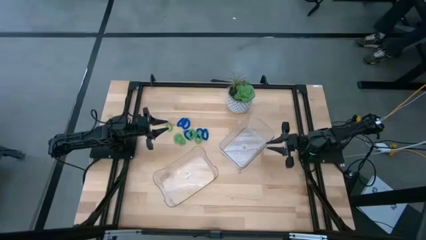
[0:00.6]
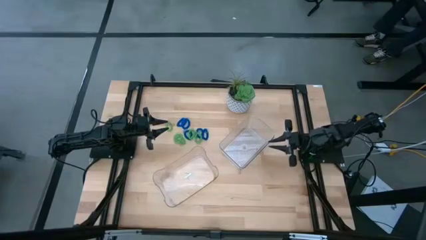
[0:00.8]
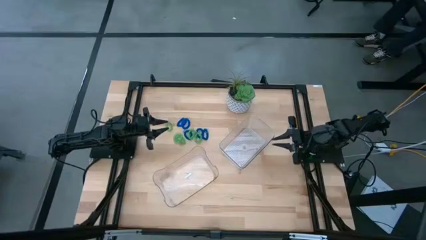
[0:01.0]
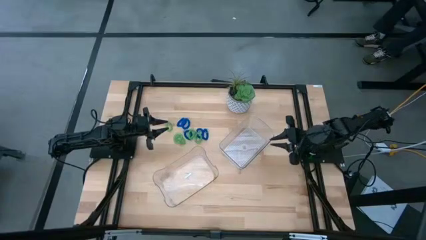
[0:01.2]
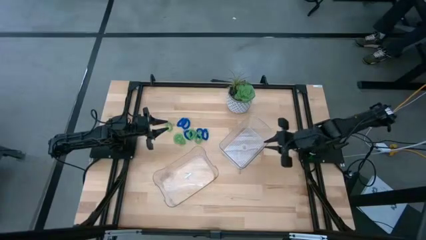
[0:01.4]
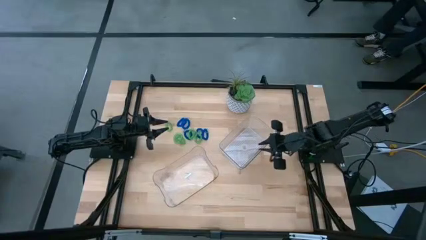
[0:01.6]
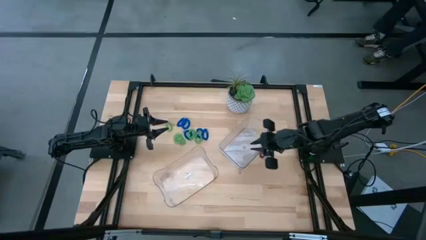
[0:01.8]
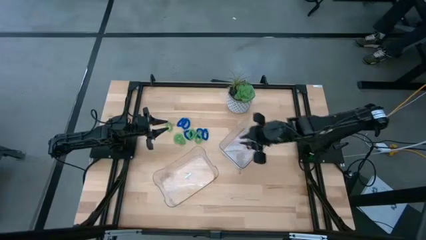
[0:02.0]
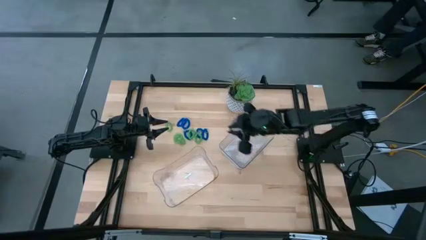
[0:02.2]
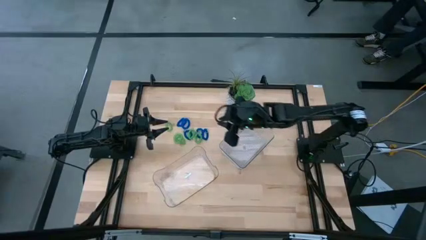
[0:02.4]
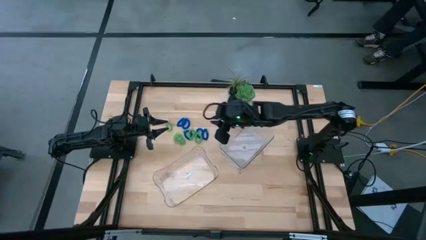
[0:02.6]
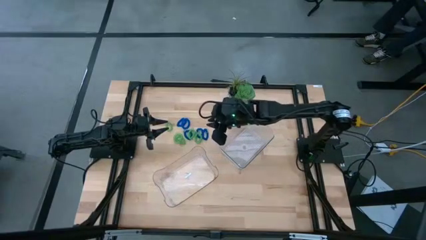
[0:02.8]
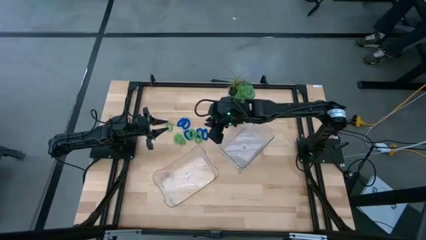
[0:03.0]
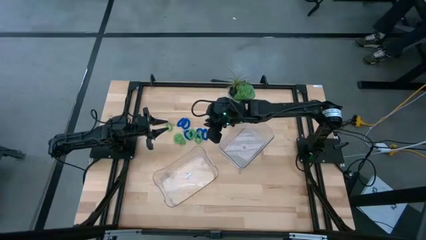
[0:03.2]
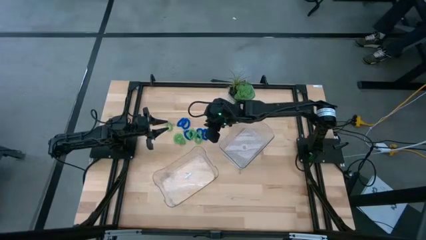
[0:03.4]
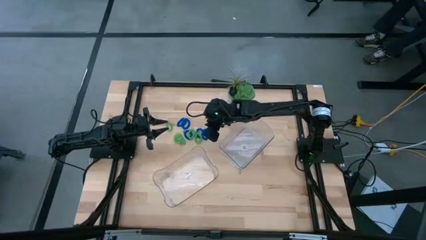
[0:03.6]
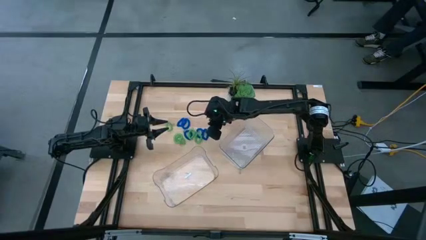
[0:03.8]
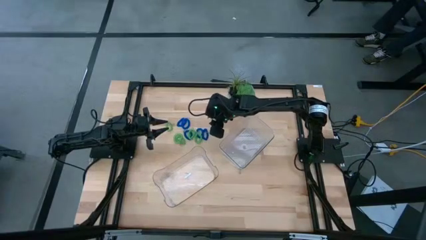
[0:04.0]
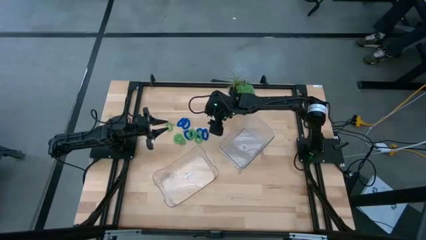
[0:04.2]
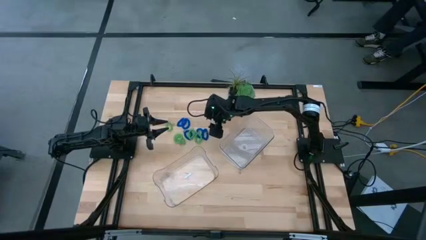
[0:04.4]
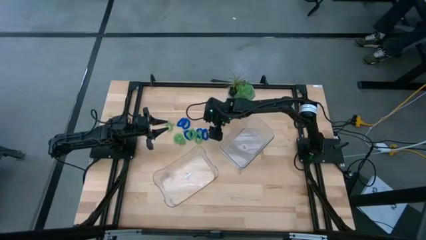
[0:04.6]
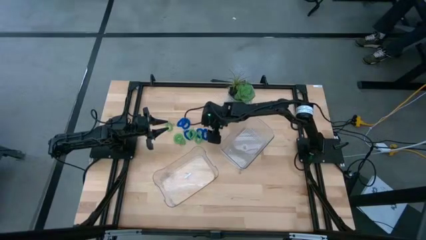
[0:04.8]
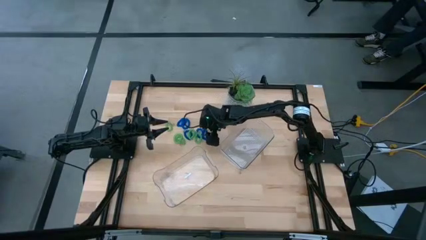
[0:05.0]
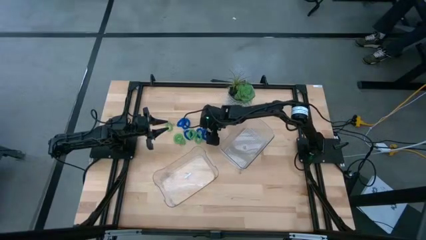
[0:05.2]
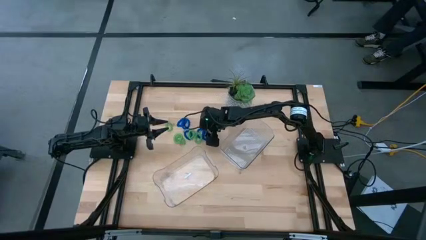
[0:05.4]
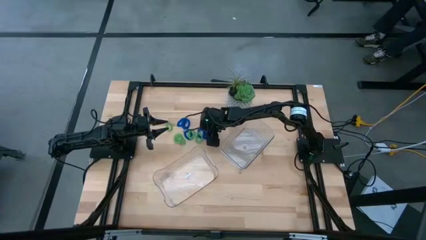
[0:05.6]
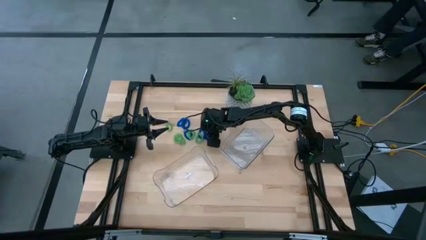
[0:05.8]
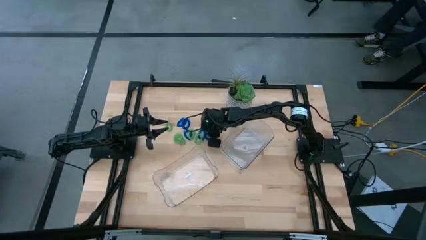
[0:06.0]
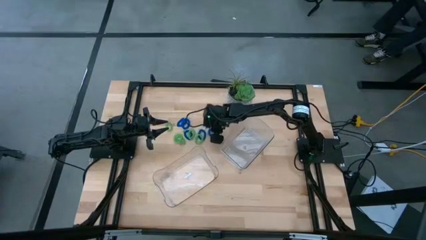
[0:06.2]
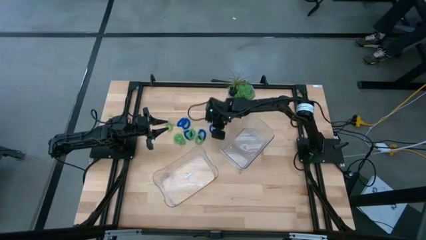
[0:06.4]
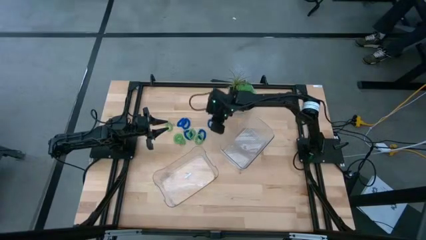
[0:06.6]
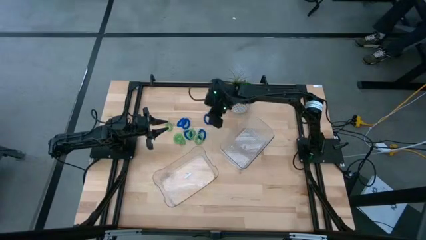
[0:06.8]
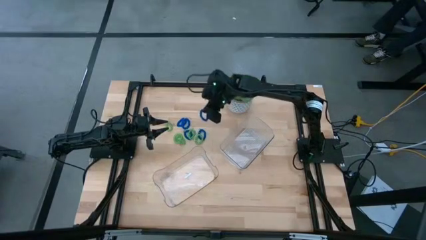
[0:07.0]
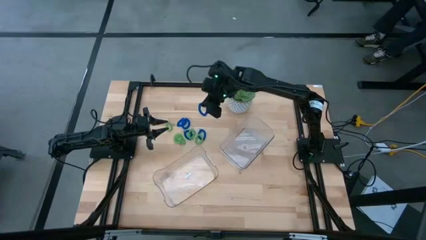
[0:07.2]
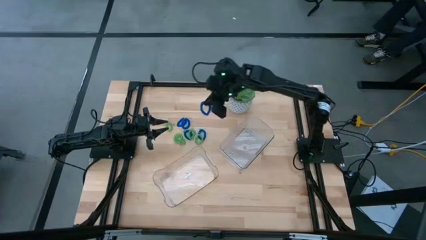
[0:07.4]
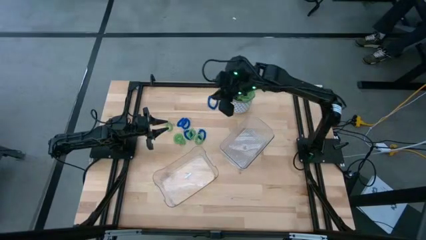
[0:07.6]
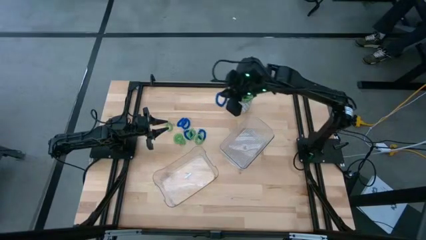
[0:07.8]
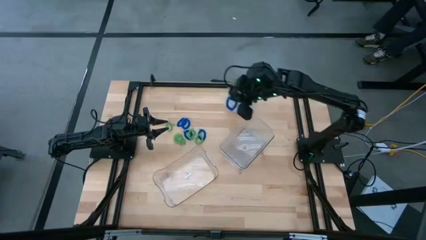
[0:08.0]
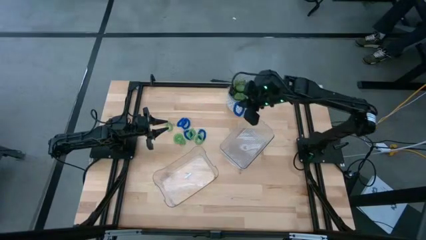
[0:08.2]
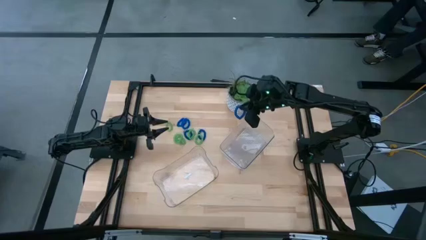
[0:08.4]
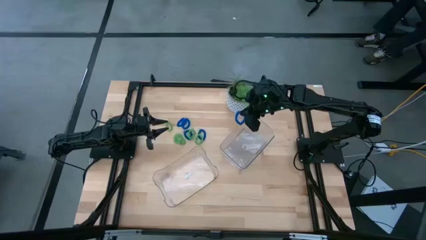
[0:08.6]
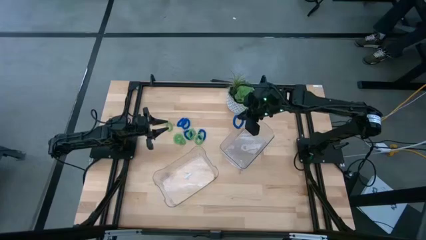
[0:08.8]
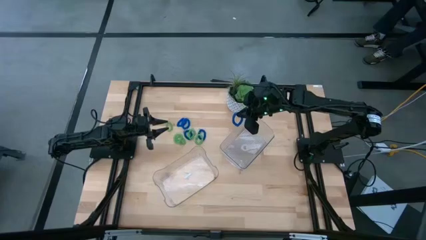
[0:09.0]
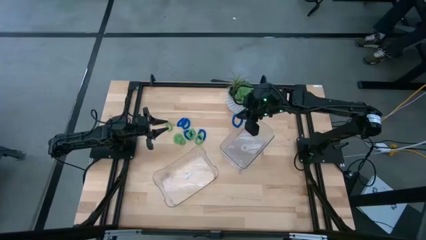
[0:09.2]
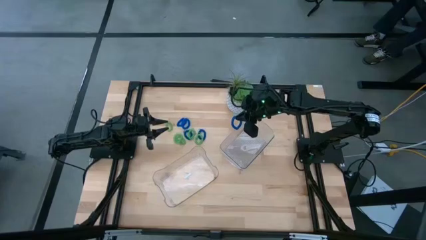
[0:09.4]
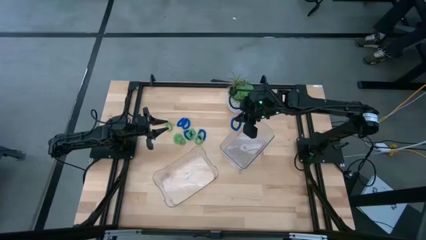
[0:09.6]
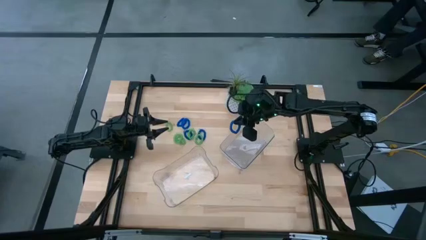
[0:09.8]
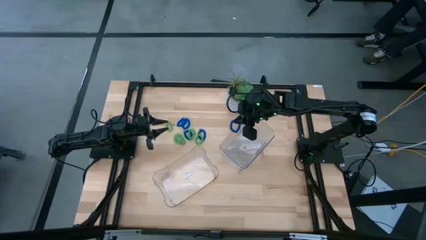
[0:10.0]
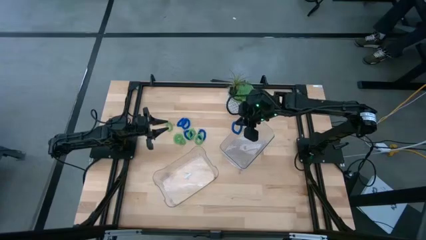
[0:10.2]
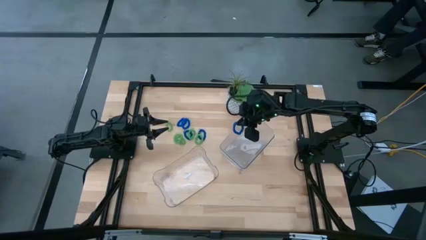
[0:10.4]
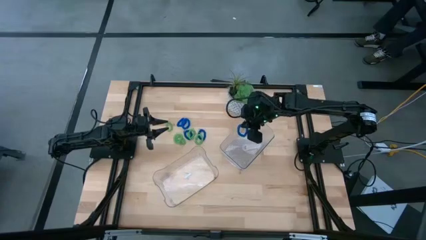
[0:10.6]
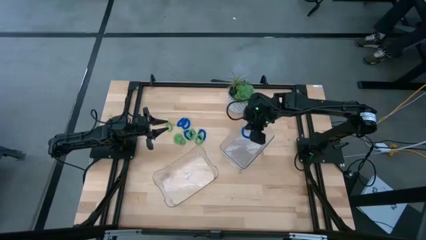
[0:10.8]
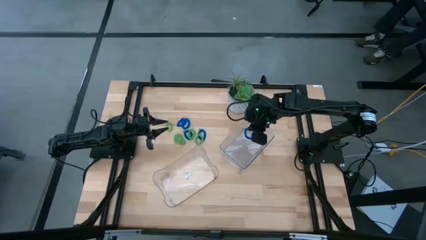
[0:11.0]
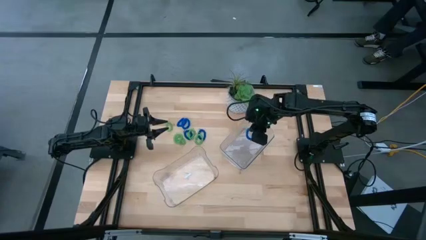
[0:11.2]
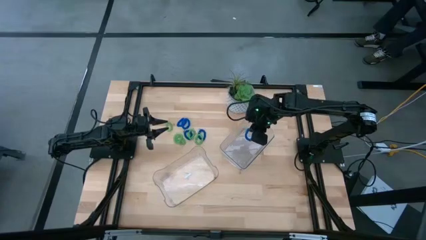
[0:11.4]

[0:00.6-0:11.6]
Task: Sort spring keychains
Put the blue spring keychain into the top transparent bin

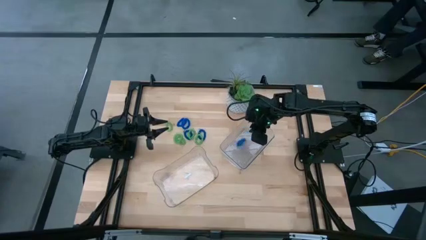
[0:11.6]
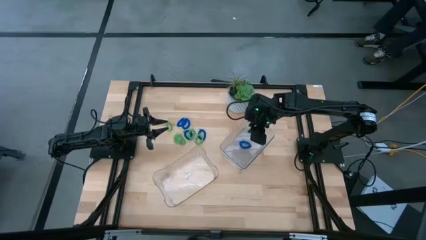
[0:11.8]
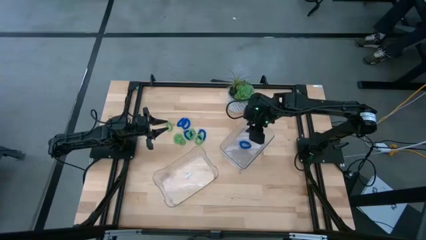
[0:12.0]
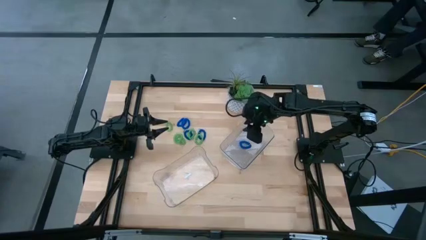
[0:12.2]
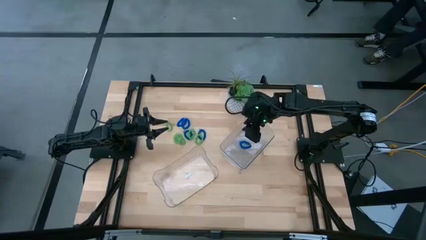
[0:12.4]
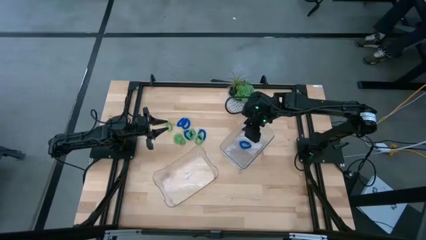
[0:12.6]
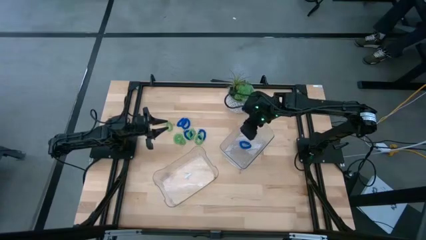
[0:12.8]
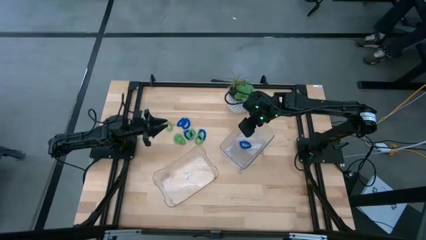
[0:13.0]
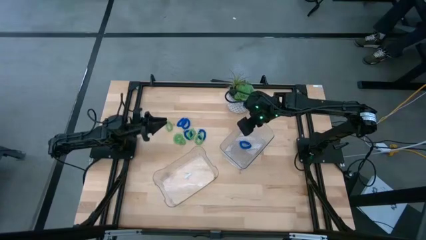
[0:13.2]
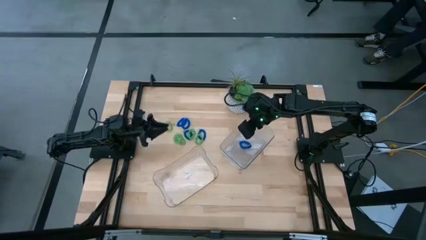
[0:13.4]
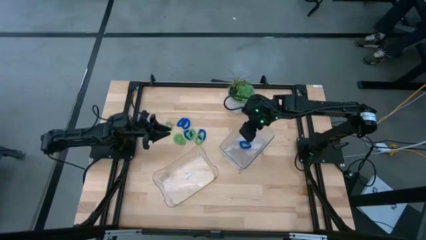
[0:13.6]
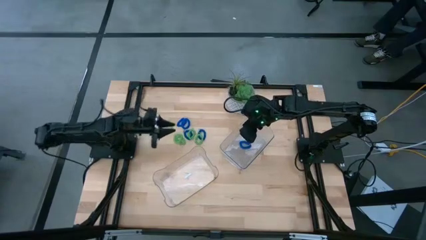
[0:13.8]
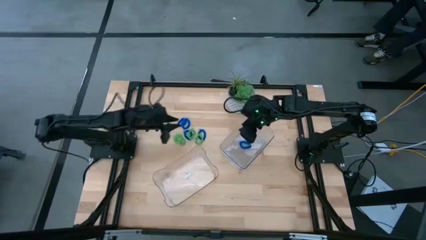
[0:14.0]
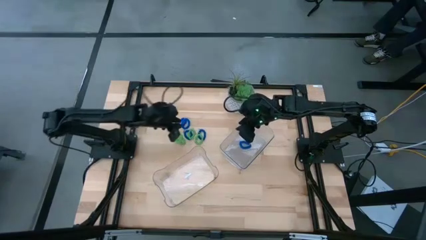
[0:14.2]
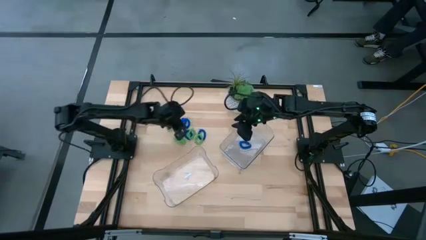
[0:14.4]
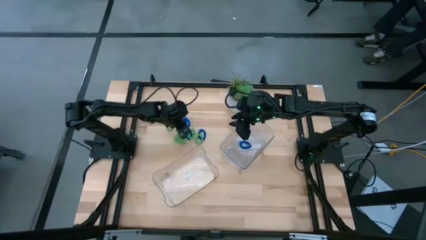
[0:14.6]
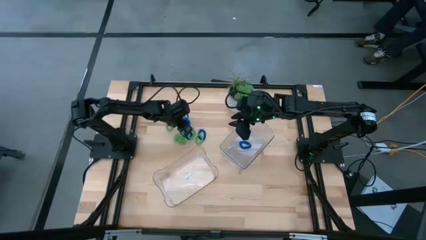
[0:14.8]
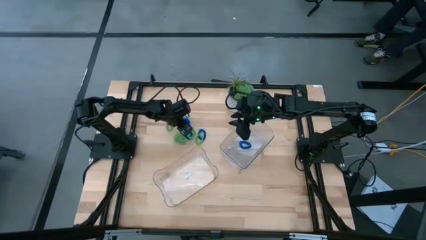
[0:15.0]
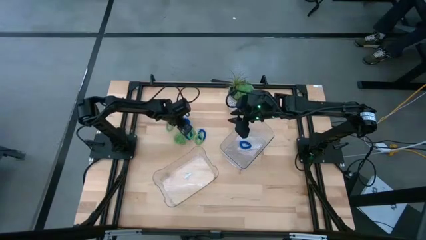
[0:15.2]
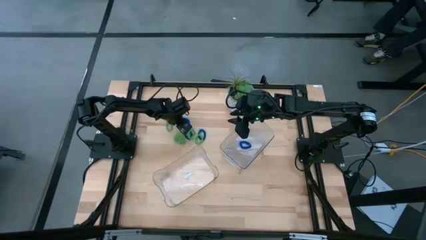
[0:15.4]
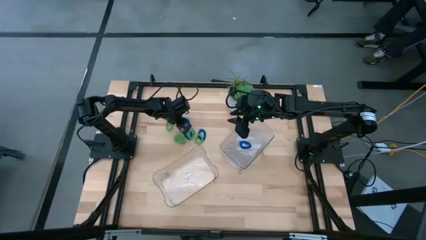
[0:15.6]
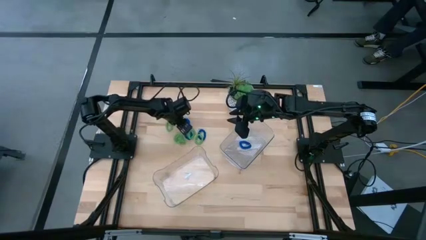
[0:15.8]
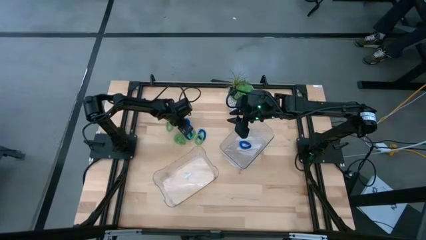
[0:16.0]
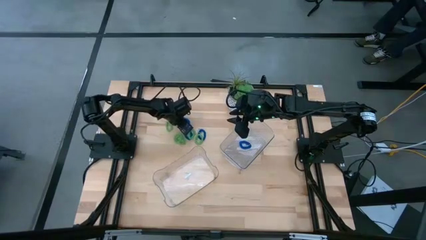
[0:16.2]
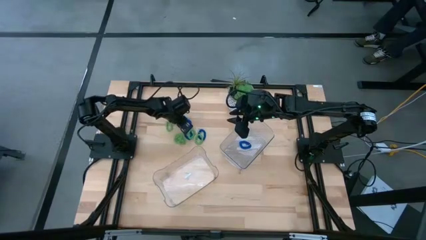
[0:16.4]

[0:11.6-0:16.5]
Put the blue spring keychain into the top transparent bin
